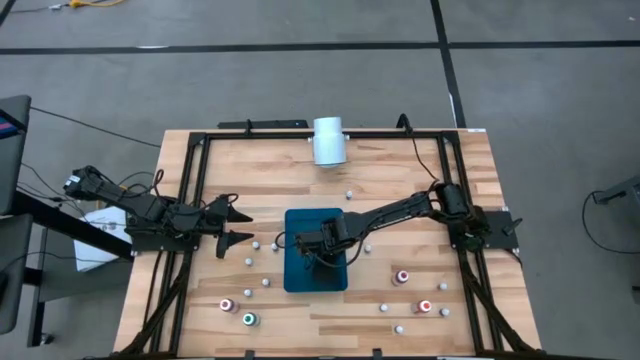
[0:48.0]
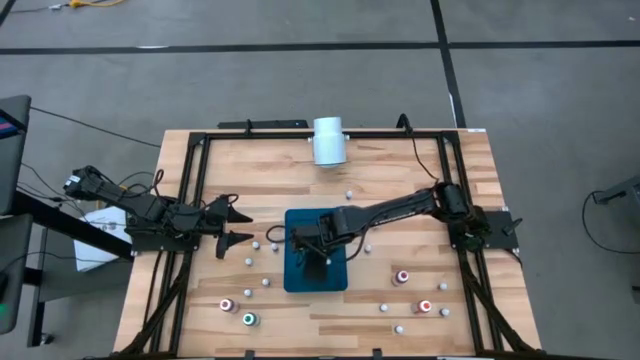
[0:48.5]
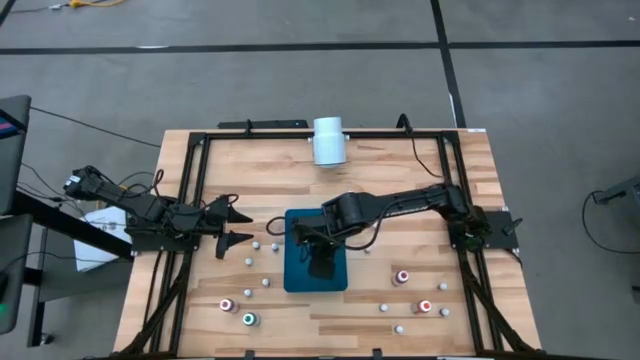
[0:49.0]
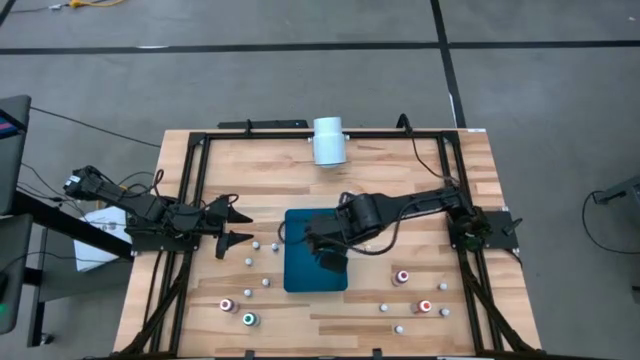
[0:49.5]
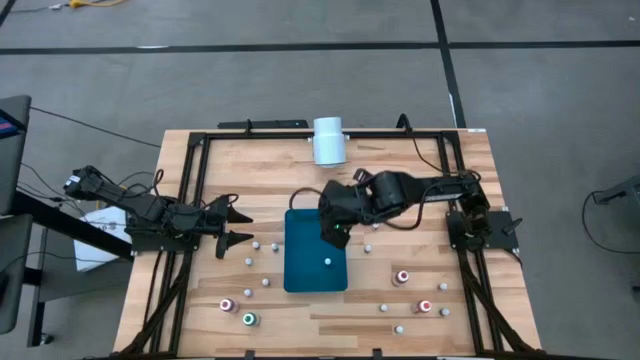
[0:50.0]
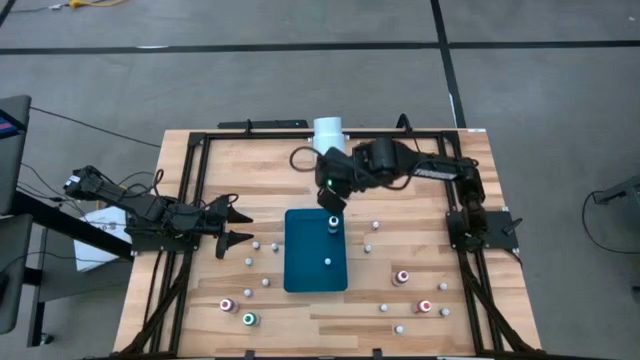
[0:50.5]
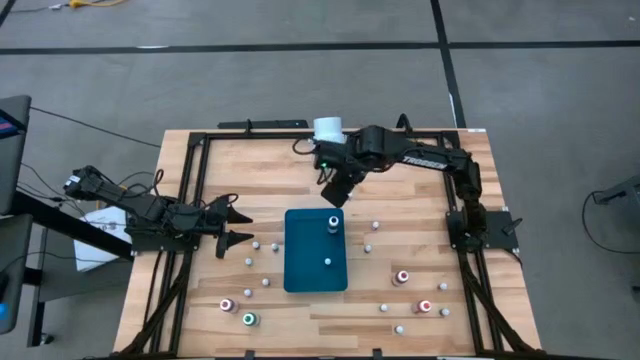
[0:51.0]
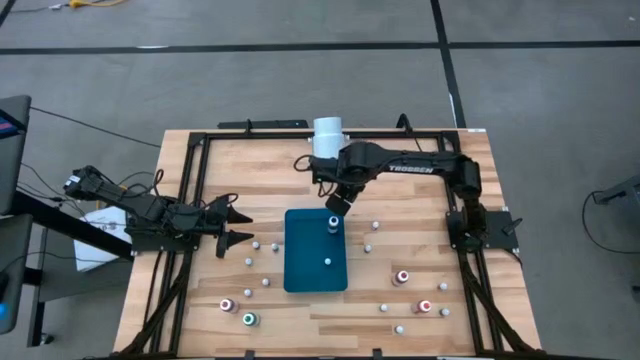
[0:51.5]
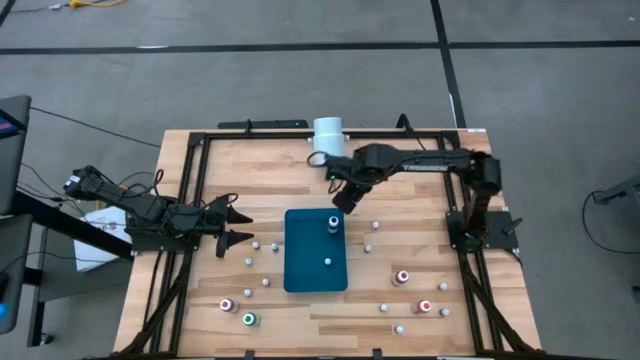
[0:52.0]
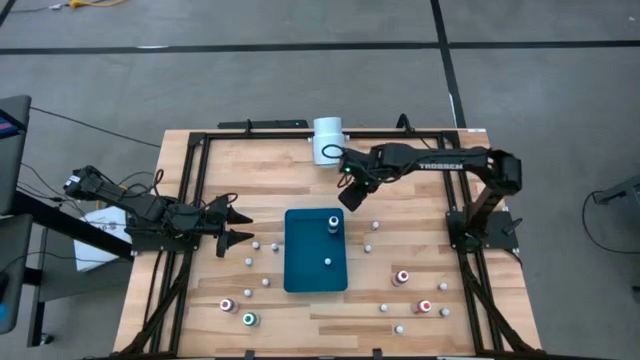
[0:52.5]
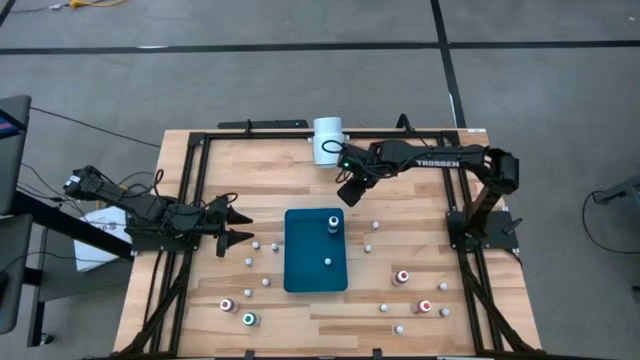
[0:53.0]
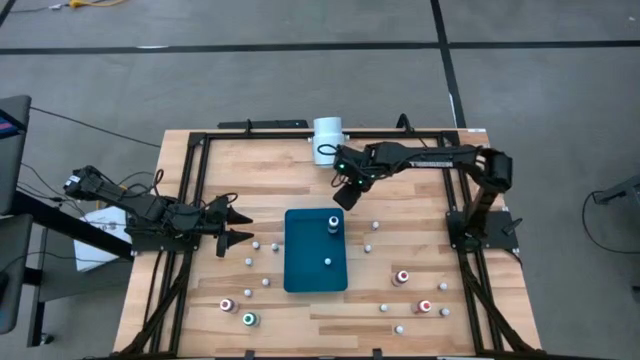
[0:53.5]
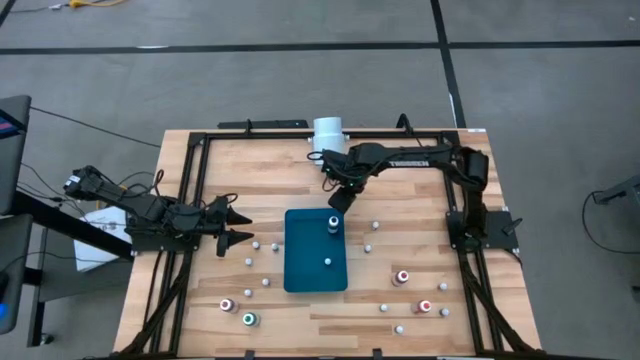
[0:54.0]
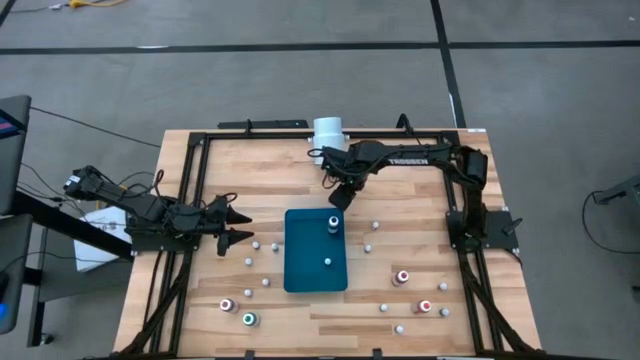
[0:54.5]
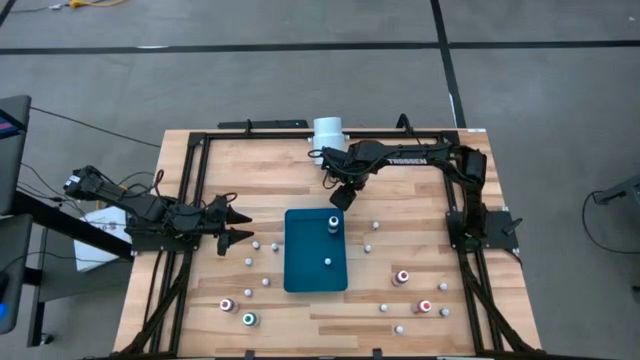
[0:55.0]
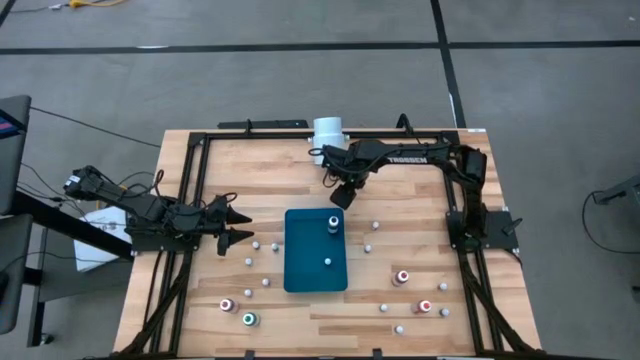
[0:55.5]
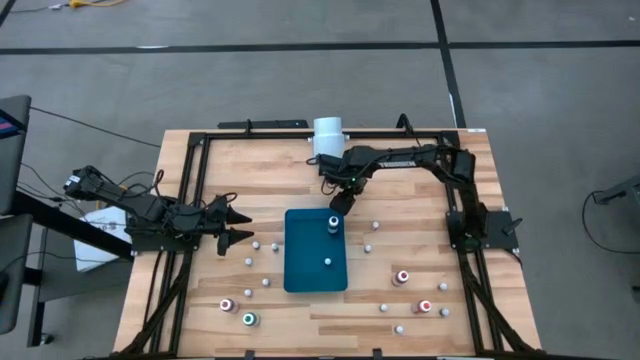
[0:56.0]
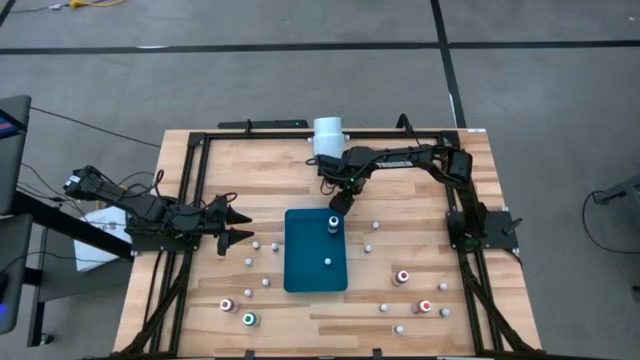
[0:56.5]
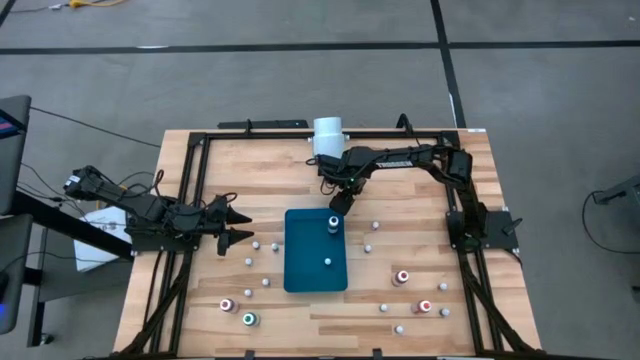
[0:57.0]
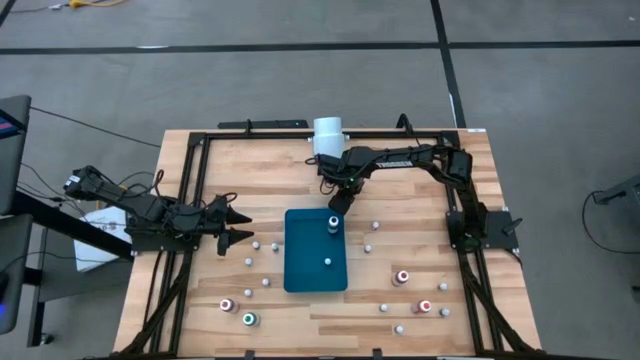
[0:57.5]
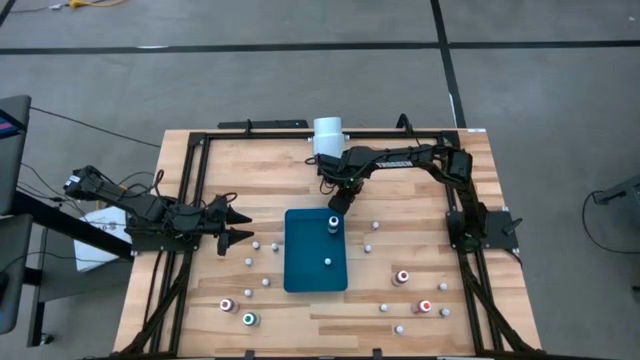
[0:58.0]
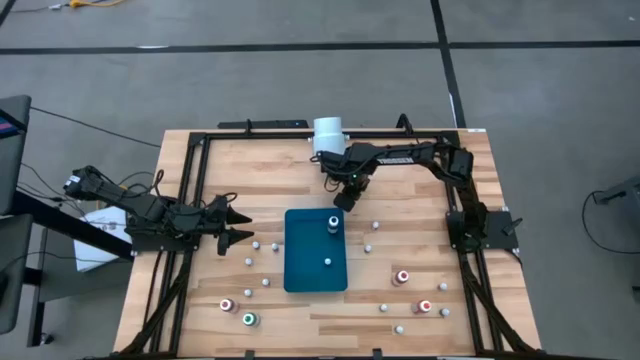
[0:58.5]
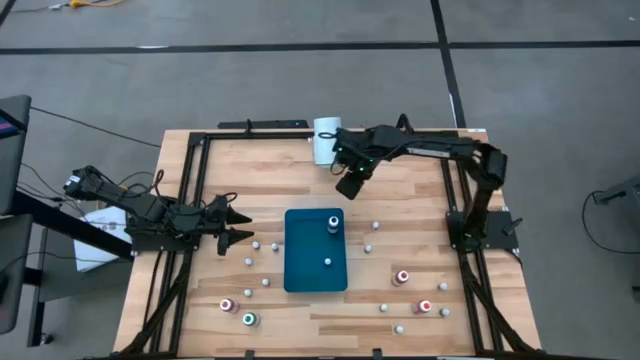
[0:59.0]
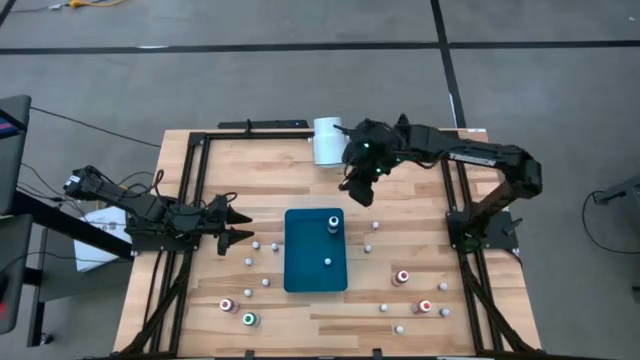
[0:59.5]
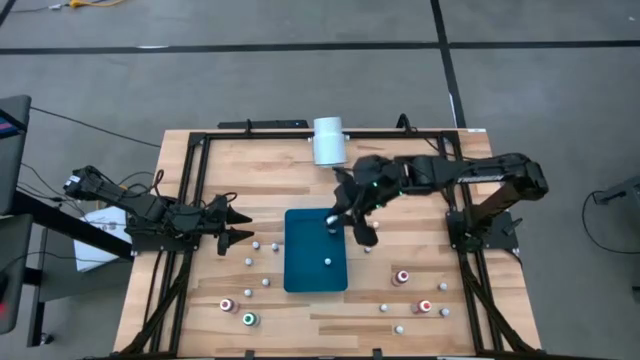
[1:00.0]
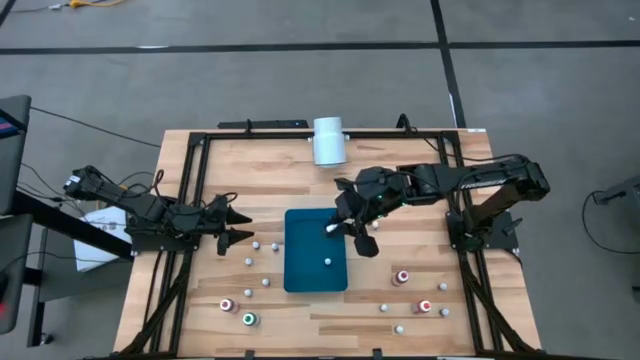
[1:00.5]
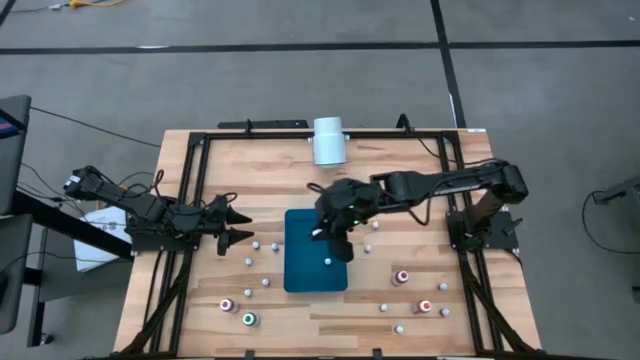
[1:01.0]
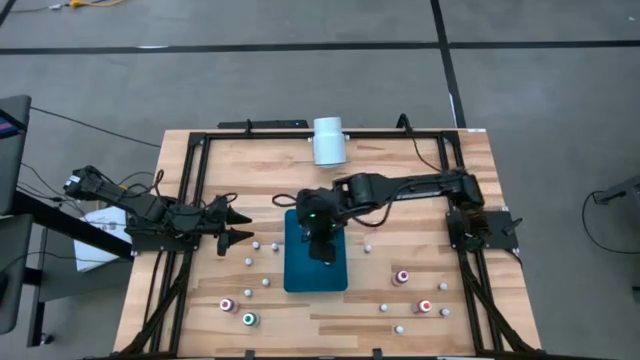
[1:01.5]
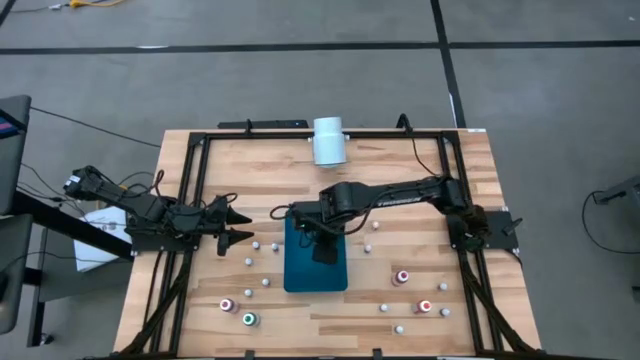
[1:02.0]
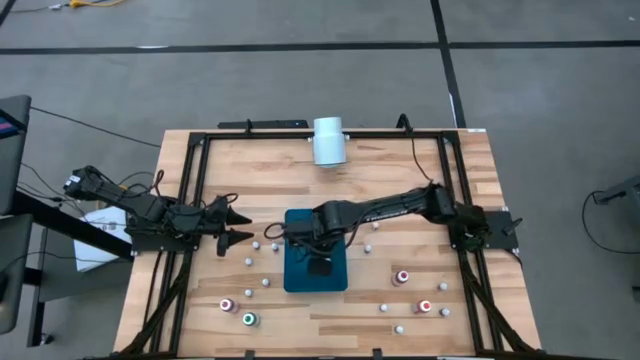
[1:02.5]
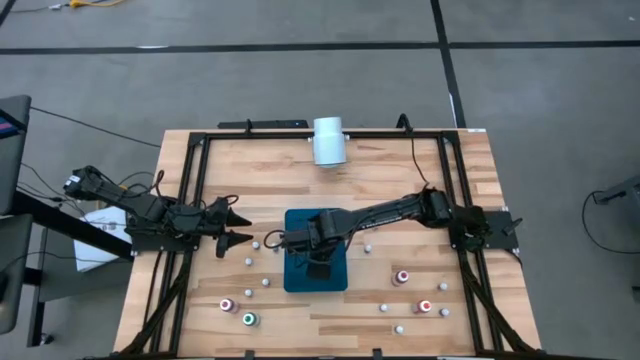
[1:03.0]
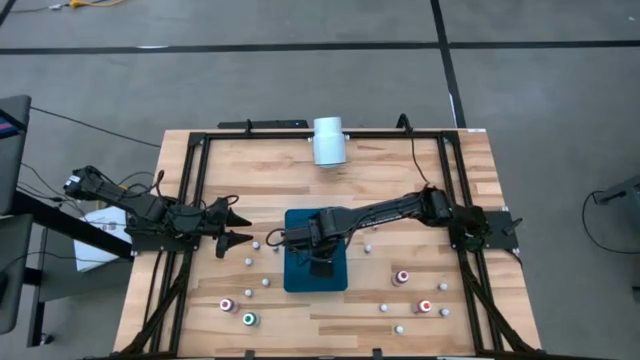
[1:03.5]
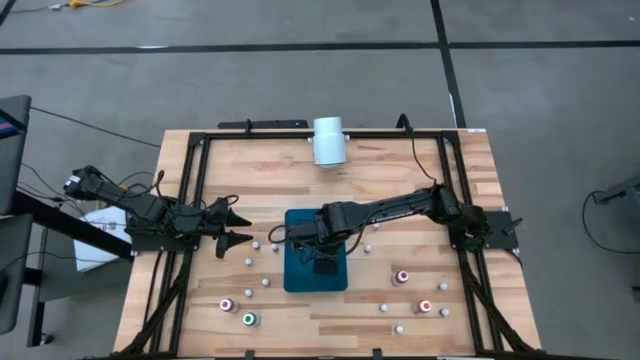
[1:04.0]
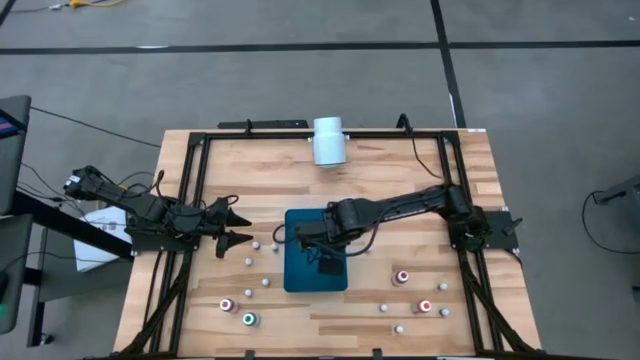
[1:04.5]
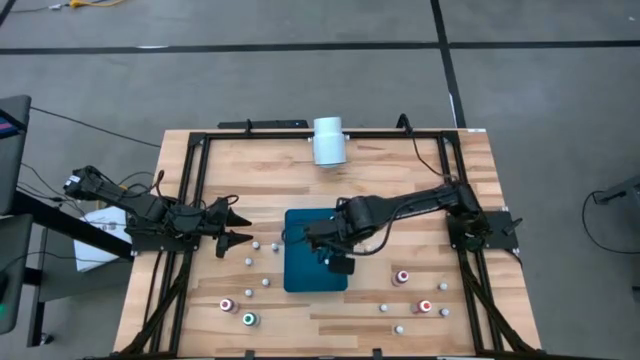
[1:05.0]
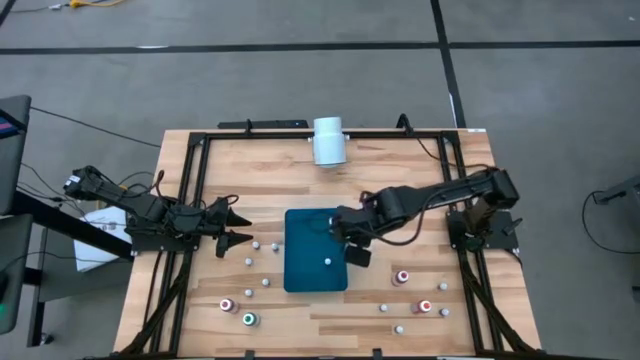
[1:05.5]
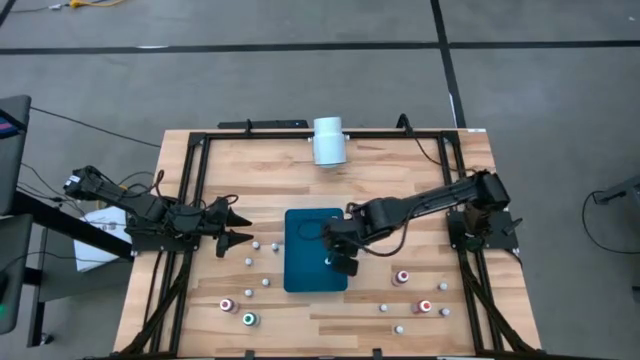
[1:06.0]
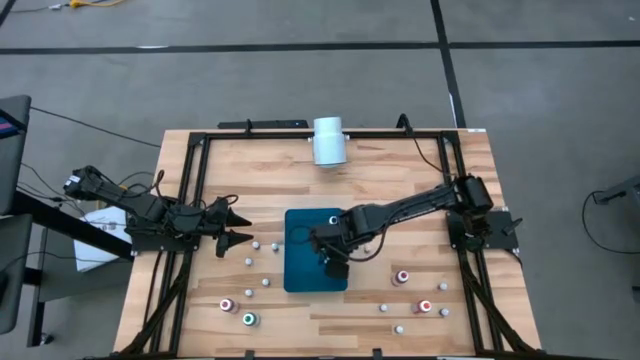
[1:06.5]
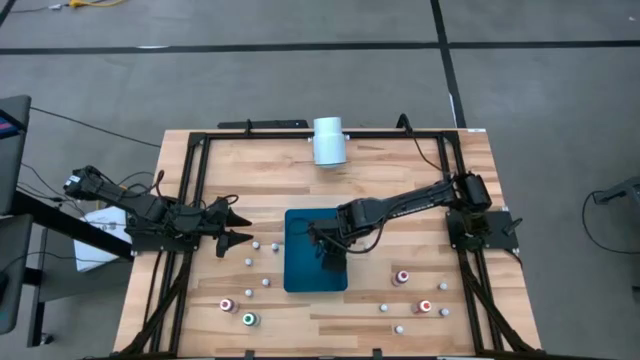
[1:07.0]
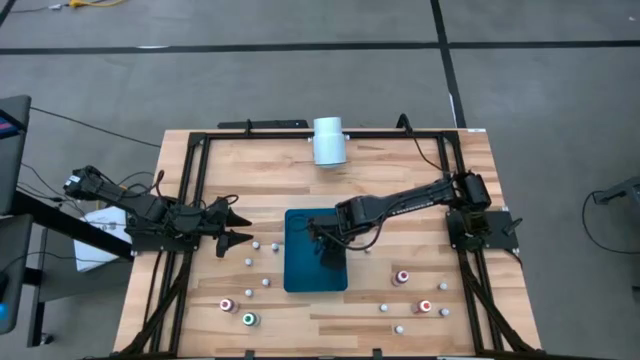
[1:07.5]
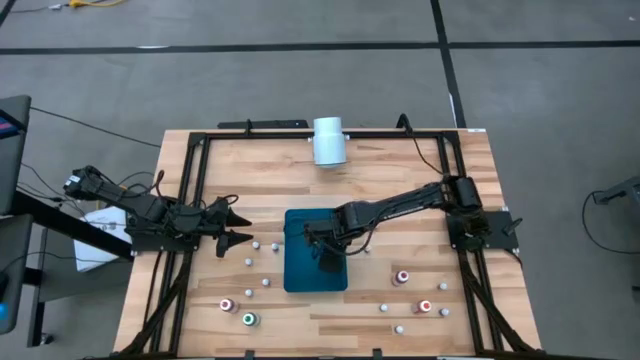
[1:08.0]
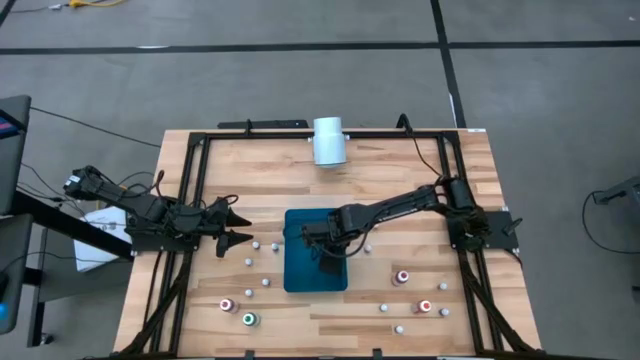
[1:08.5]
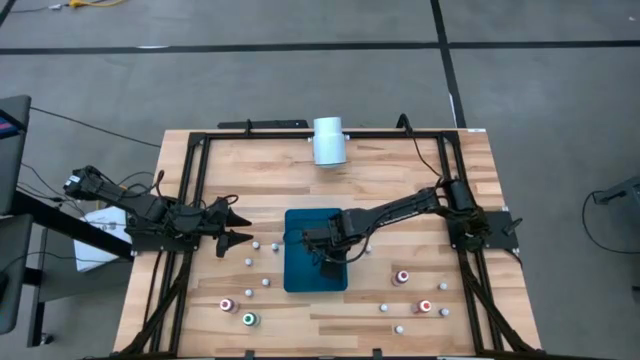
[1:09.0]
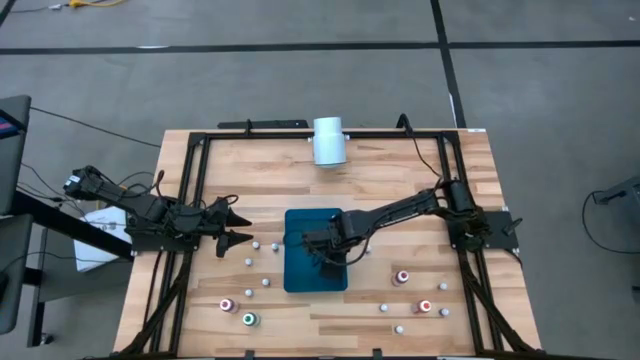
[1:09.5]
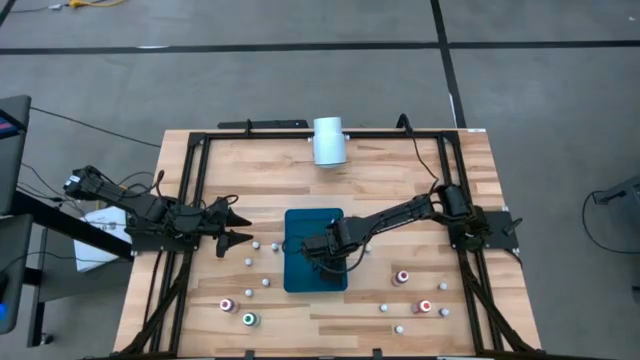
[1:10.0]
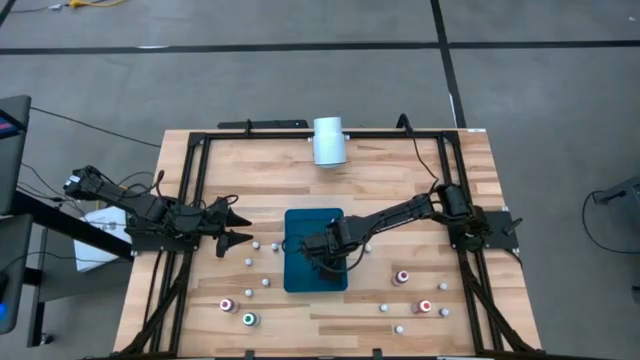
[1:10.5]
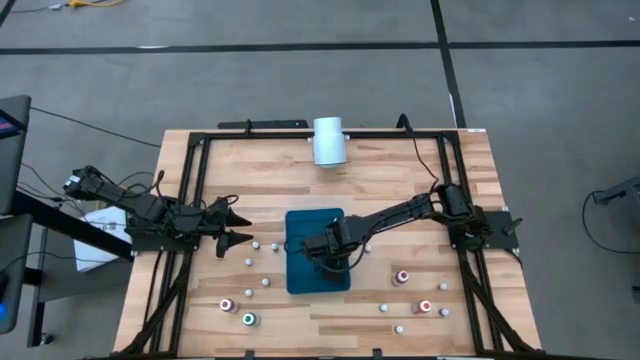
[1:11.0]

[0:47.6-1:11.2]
Task: Pick & Place food coloring
Put the small green food coloring bottle into the blue bin
